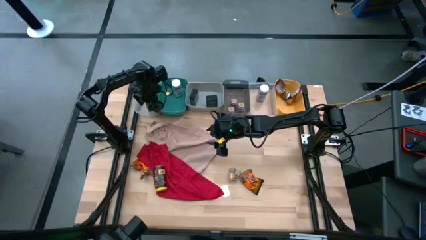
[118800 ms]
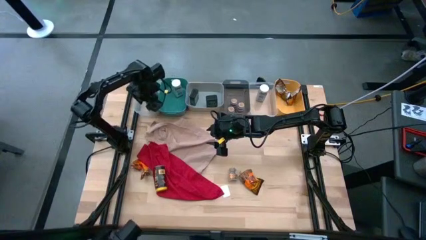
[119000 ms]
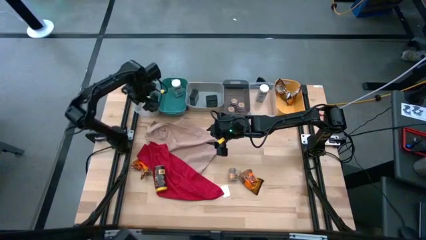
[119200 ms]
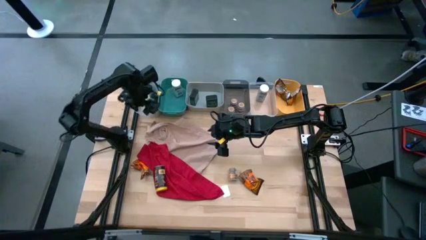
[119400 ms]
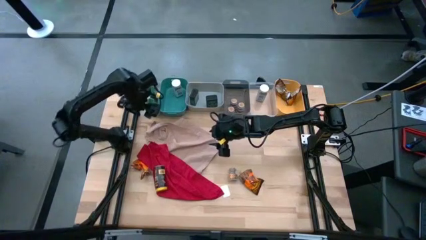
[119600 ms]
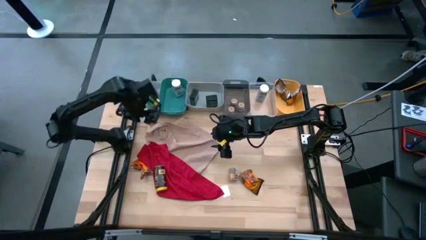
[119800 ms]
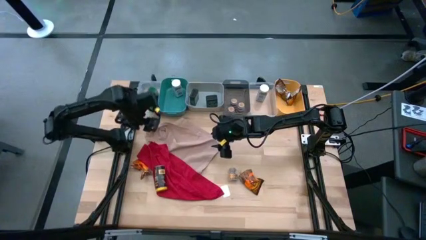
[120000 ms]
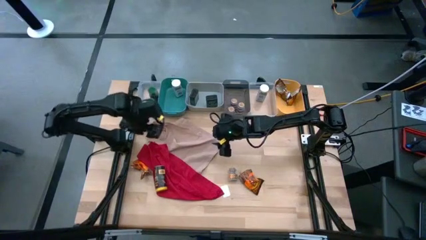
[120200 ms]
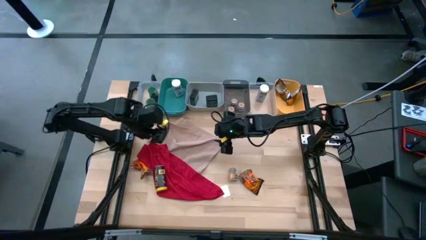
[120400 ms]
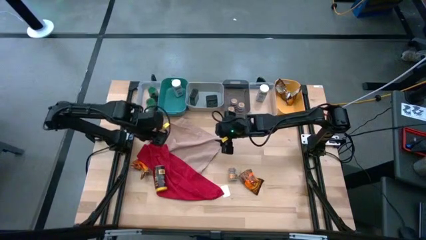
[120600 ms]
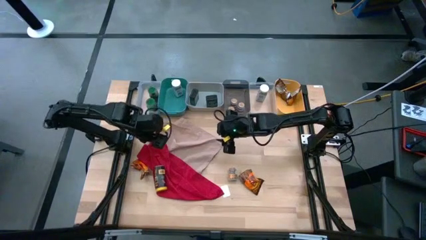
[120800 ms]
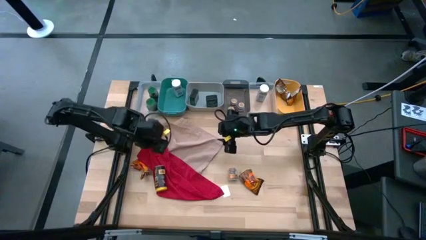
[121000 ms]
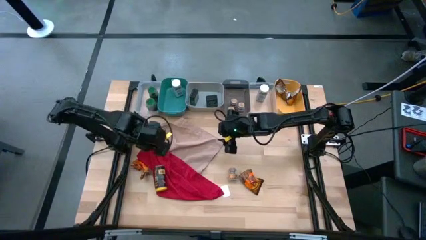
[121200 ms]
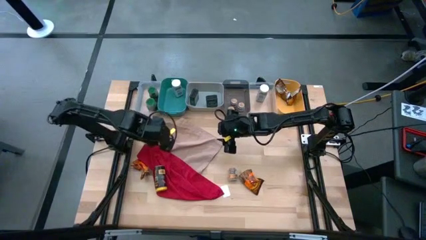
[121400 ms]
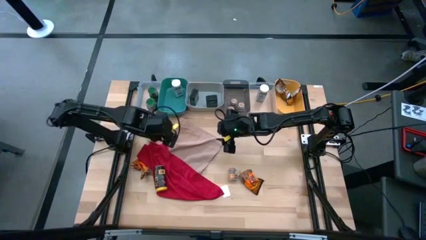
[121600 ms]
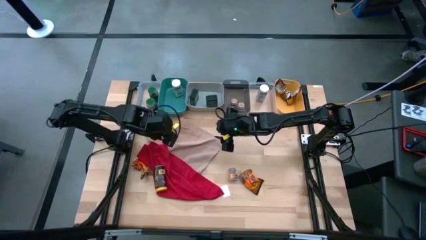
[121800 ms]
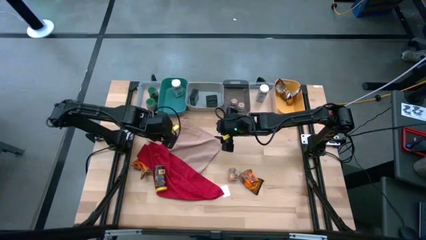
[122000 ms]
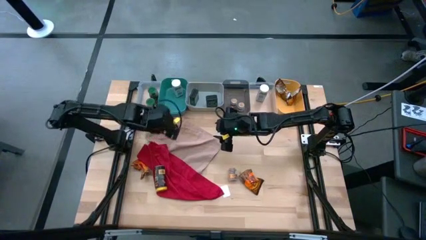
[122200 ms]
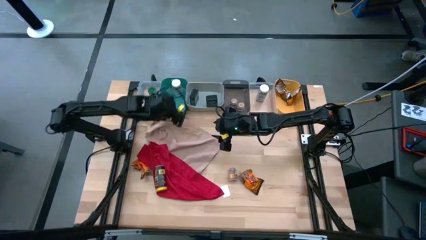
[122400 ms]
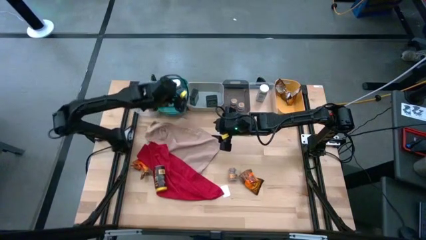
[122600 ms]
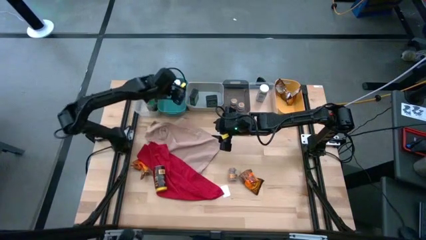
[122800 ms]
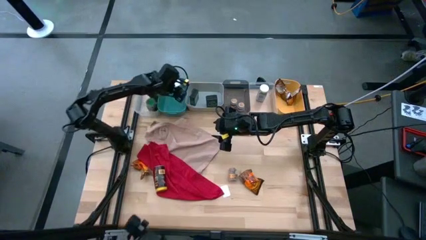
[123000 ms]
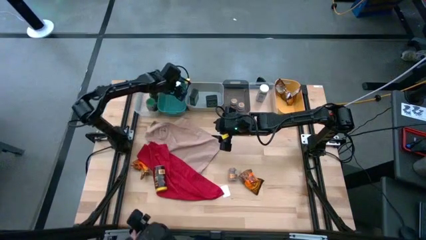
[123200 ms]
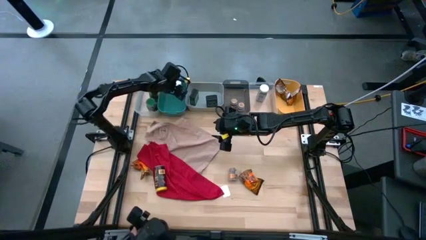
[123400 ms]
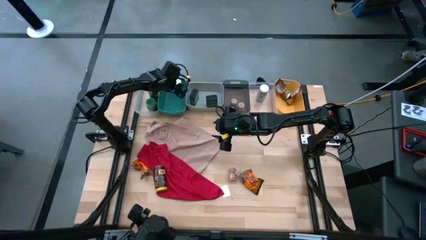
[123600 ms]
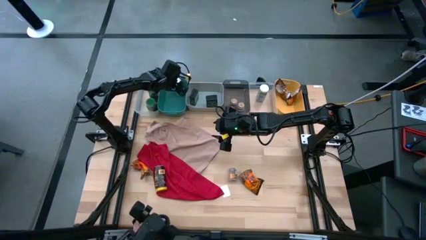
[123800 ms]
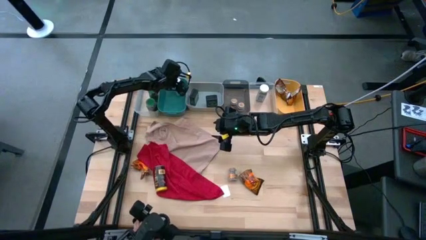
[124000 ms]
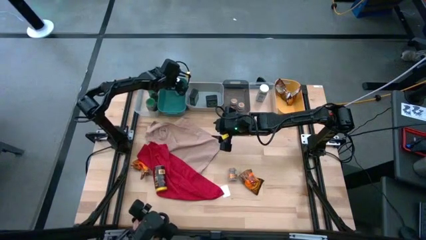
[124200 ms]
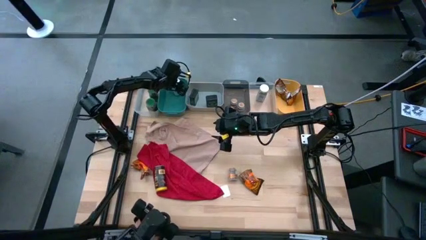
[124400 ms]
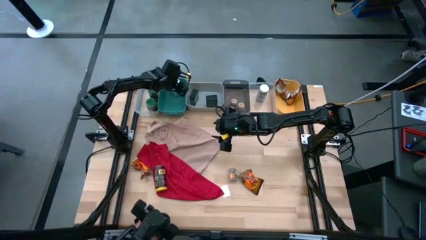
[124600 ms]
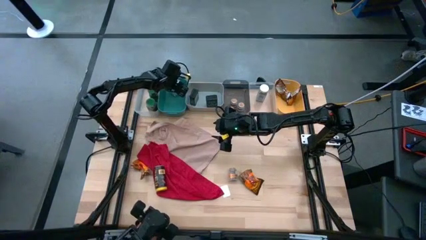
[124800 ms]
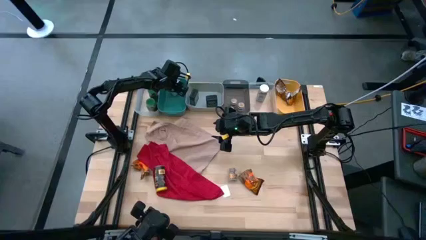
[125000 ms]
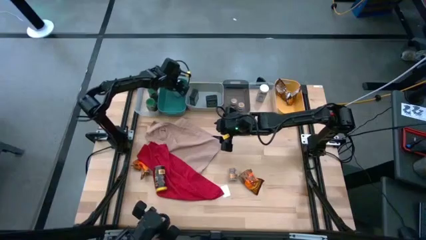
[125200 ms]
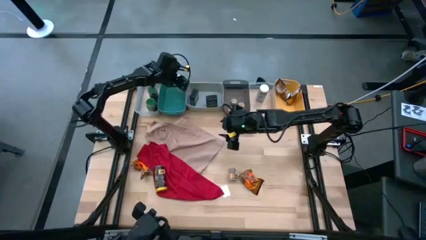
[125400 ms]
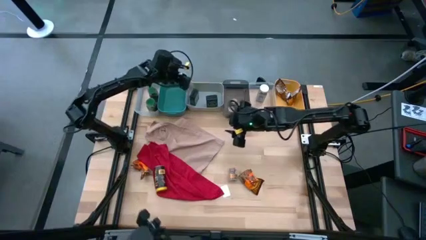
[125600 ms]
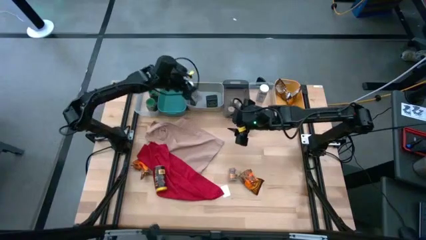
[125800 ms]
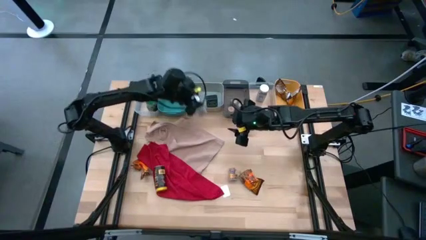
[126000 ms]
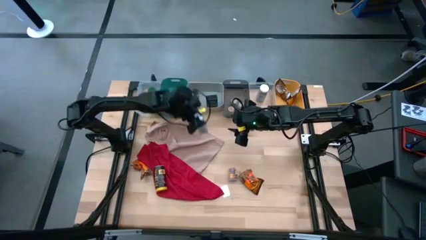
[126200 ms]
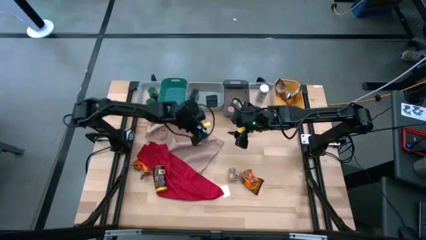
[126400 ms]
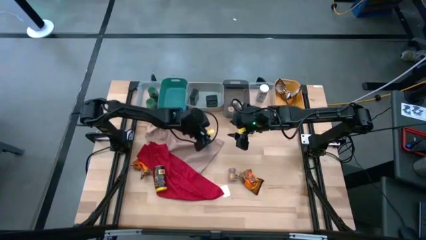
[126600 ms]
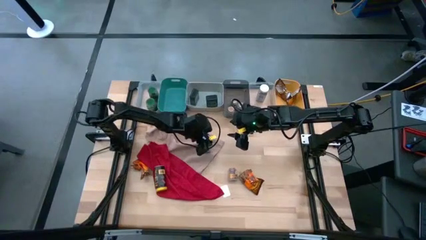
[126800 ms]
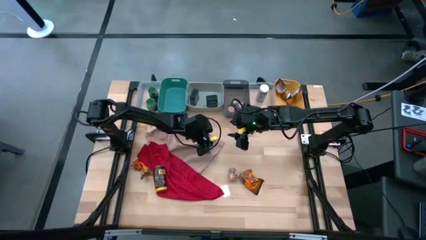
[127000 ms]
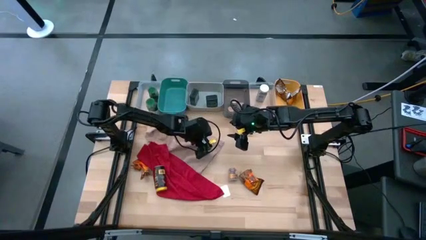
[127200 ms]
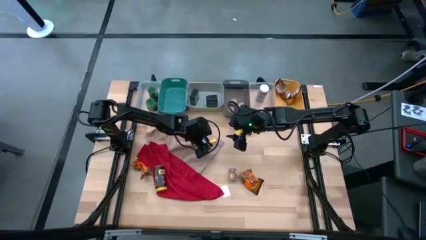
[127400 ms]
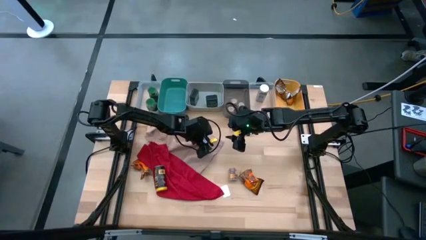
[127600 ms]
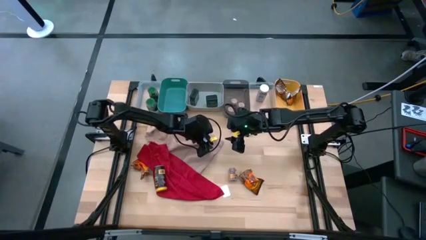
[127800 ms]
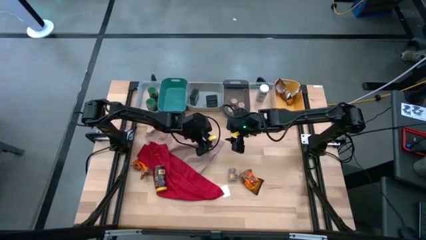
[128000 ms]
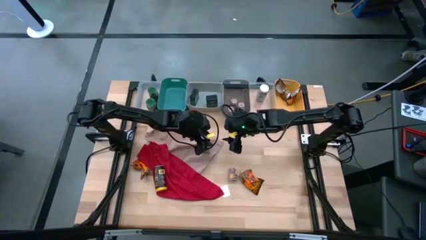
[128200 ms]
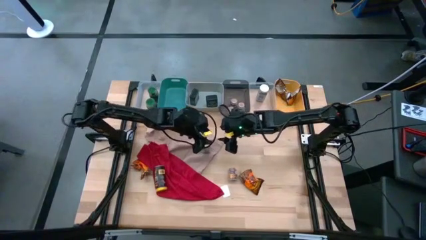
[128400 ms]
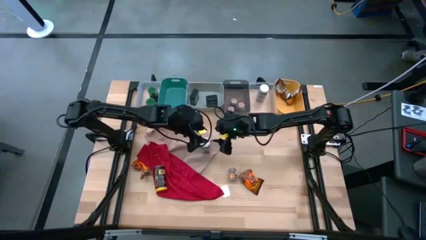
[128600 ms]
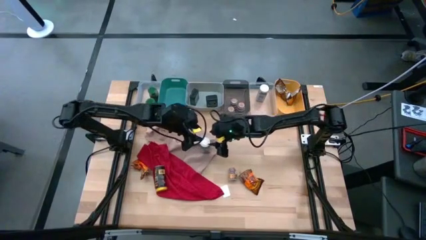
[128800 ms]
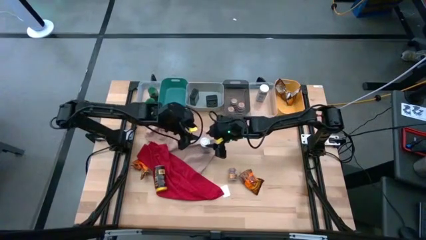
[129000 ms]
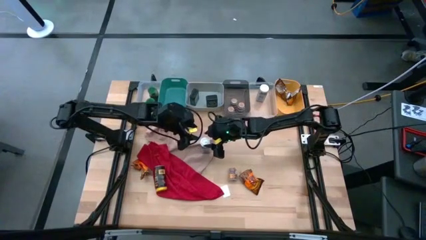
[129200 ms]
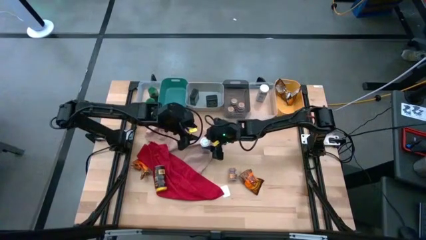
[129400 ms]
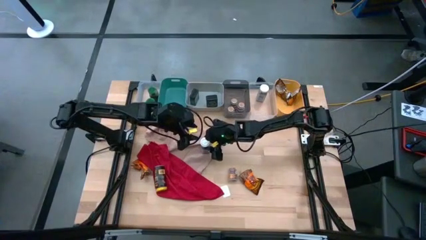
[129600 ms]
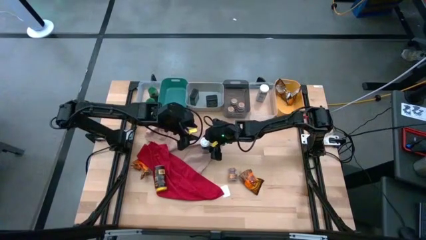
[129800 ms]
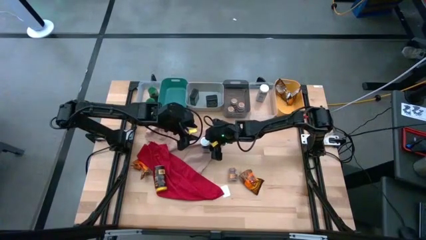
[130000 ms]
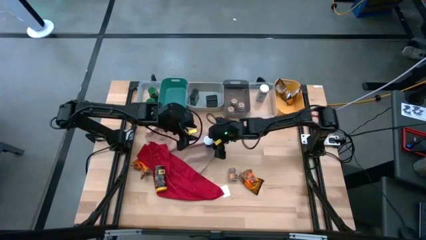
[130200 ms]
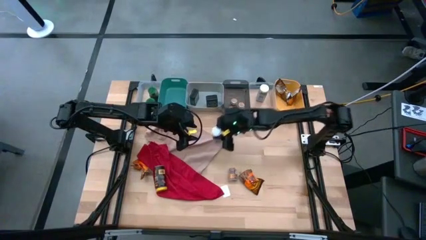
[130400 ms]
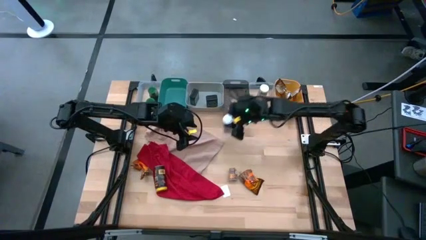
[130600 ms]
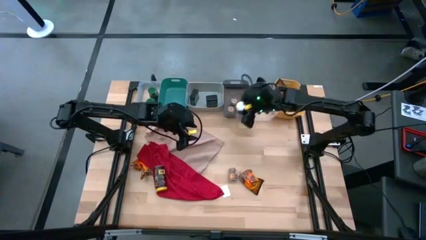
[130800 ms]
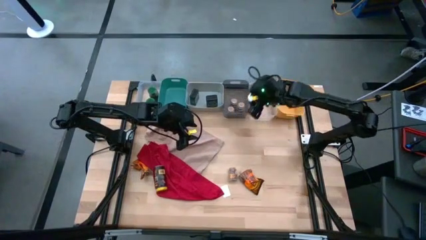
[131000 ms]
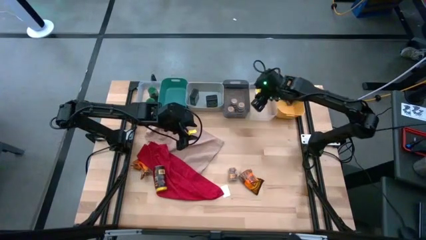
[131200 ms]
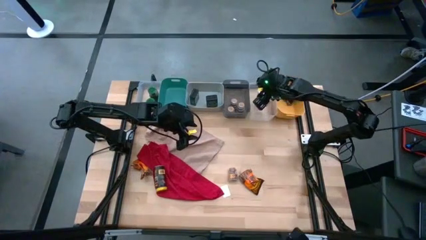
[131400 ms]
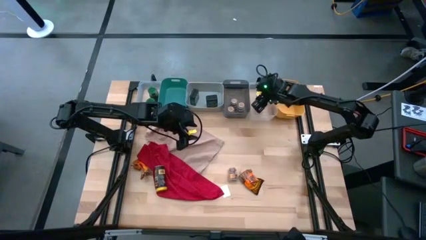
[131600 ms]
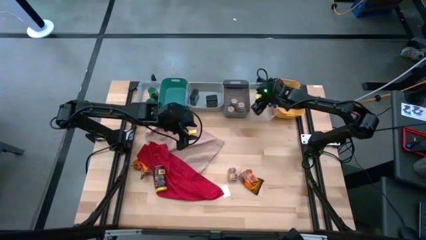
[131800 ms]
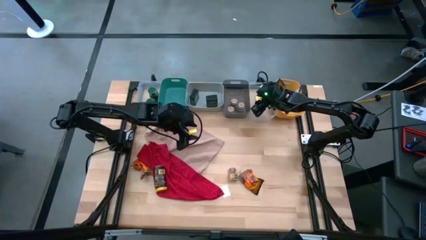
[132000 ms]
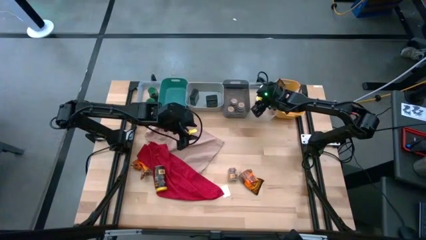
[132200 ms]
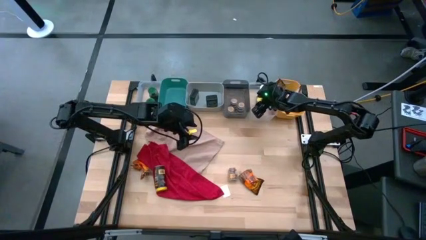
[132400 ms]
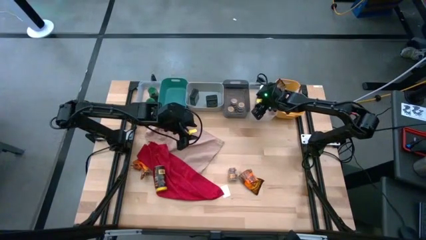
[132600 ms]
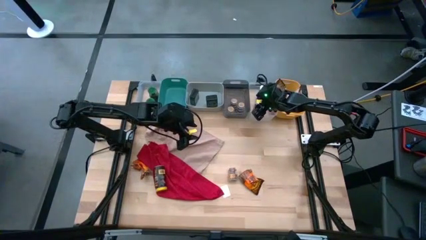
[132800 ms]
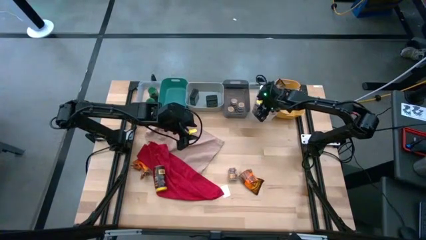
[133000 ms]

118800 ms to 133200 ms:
Task: Sort spices by type
Put the white seasoning bottle into the transparent bin

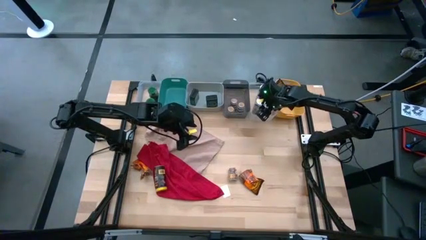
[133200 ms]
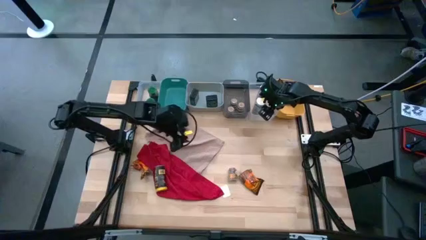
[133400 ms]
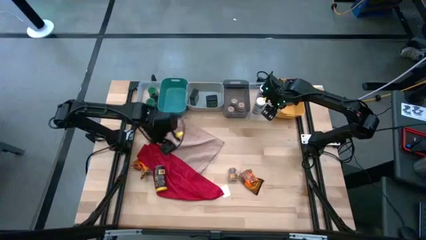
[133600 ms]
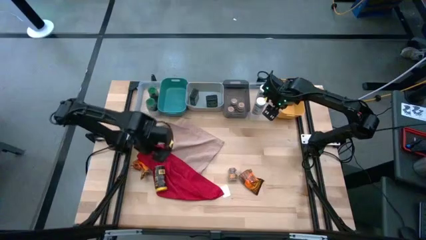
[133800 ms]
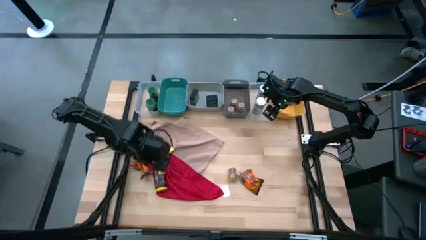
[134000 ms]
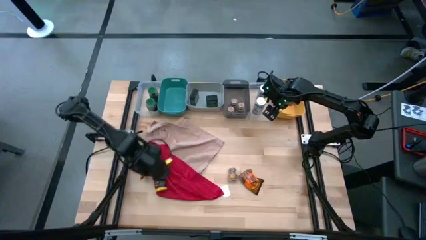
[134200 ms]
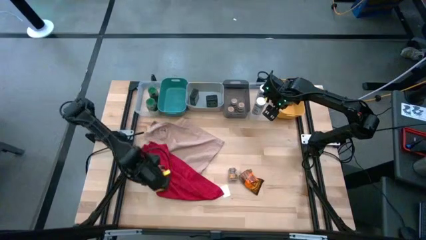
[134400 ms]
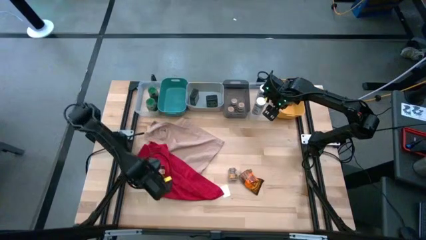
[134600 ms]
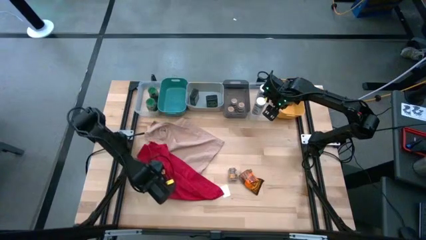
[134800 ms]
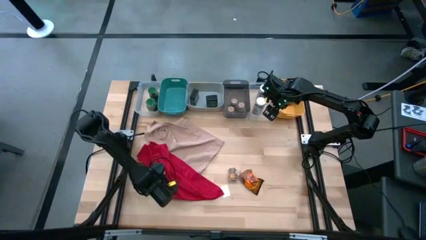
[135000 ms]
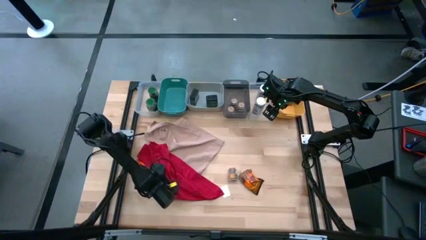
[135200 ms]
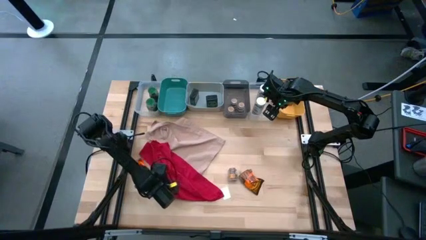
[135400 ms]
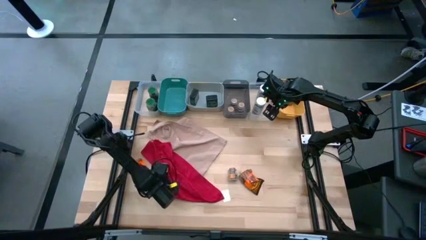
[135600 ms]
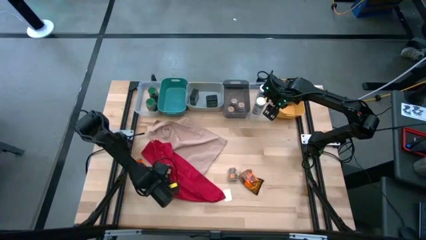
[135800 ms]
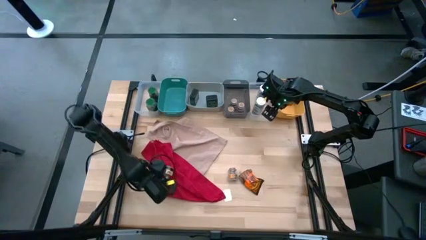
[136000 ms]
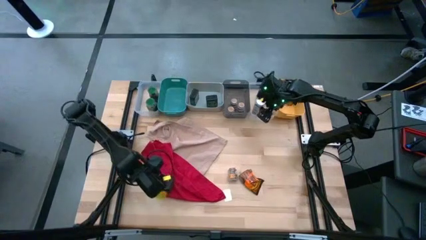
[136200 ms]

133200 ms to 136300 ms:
Put the yellow seasoning bottle into the green bin
